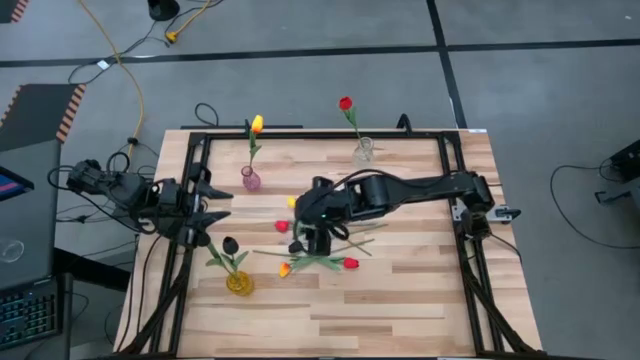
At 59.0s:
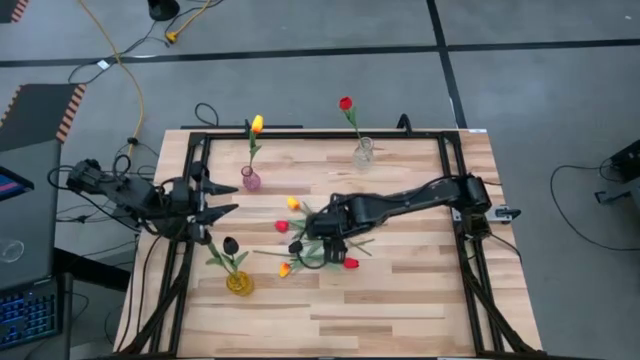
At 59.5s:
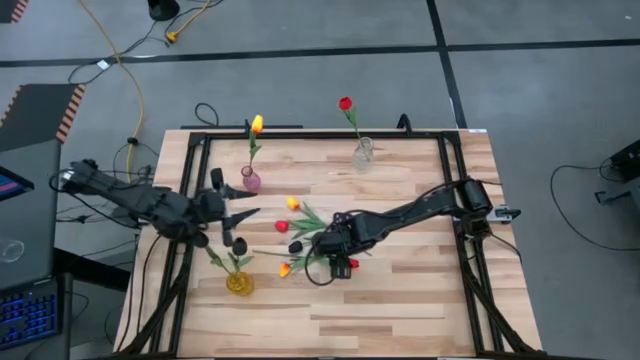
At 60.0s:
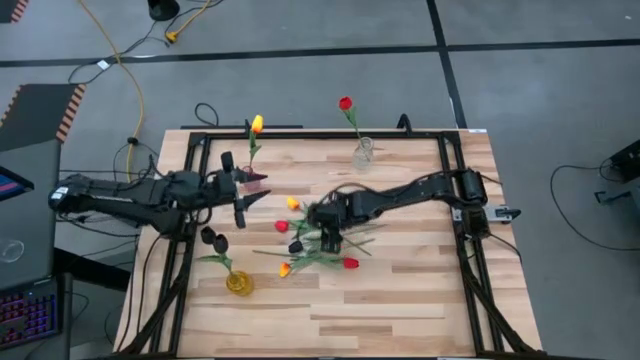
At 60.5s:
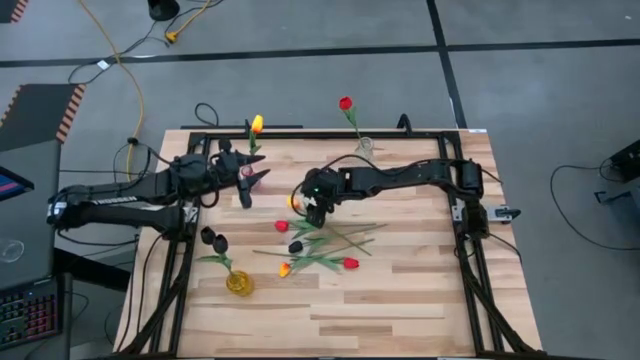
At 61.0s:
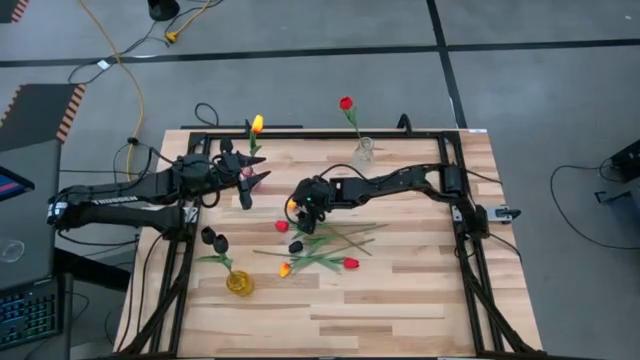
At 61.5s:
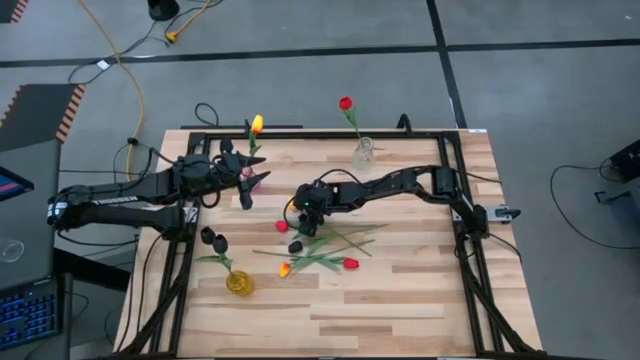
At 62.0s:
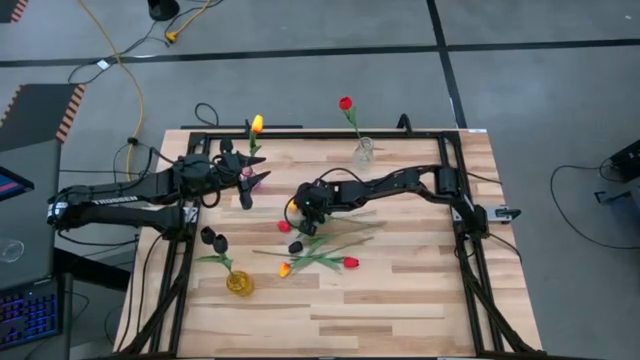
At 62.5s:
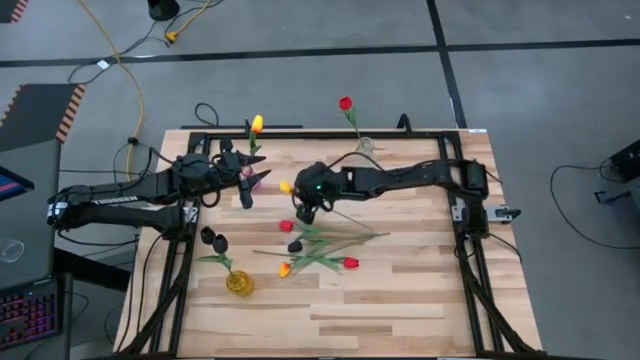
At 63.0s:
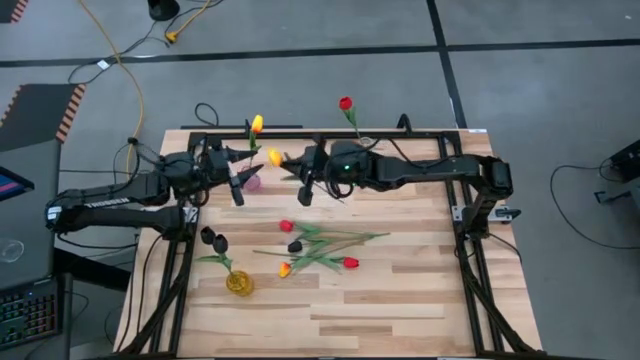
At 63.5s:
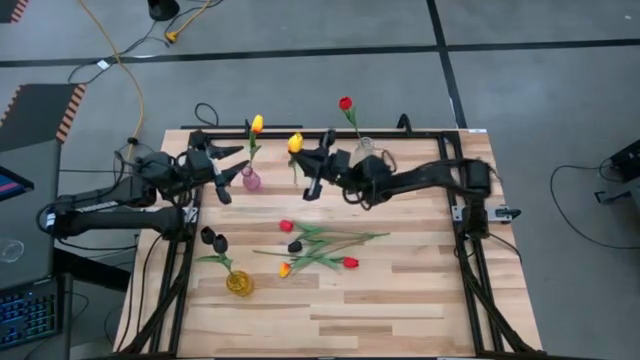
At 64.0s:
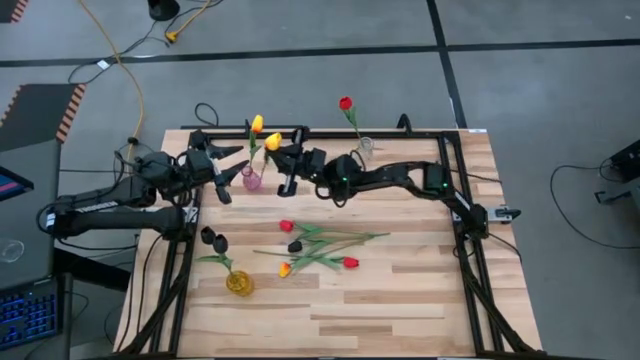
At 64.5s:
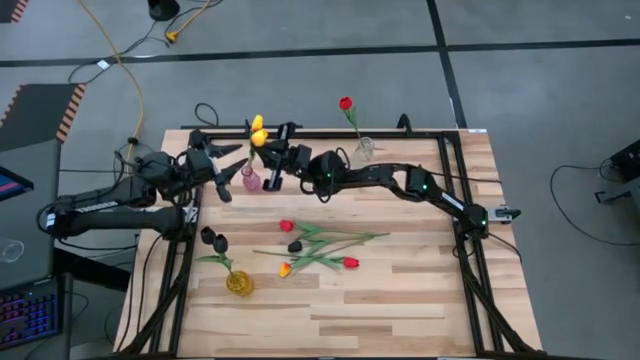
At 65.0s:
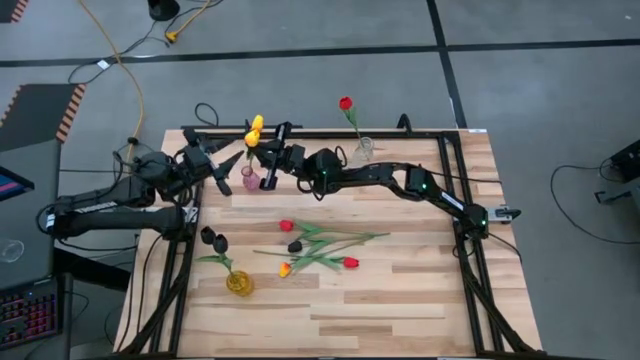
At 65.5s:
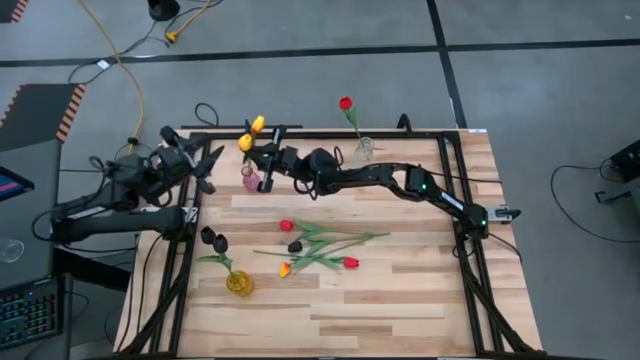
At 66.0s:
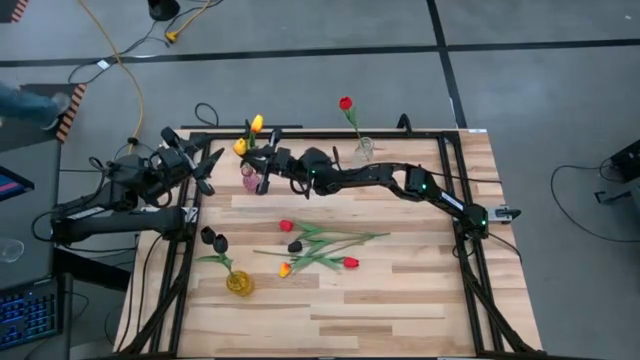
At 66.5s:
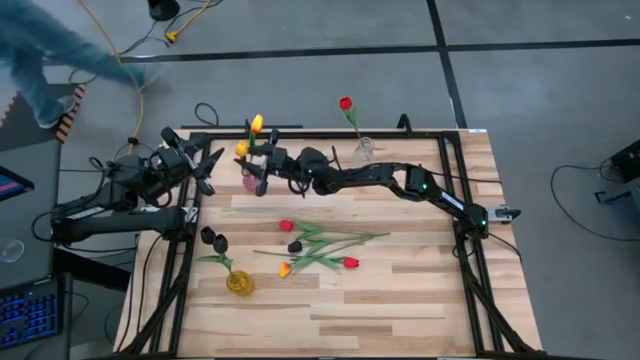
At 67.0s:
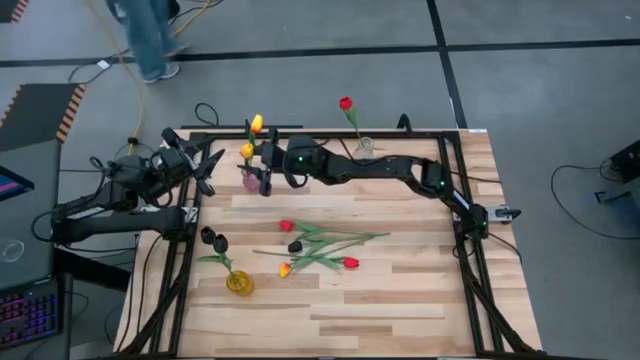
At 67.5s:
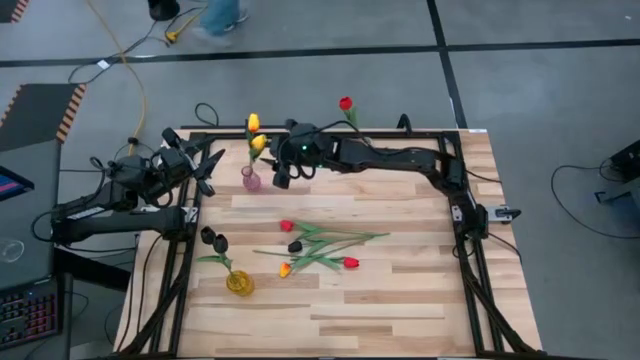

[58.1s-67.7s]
Task: Sort flowers into vase by color
Put the top yellow tulip into the purple vase

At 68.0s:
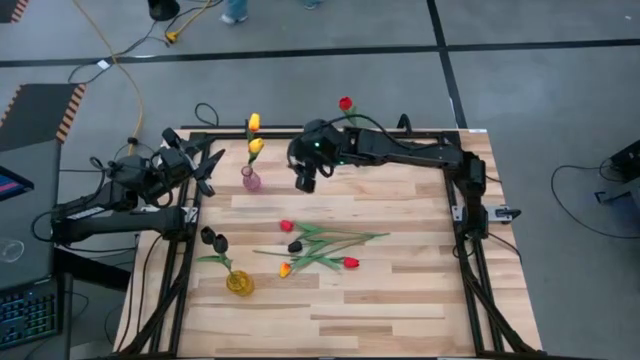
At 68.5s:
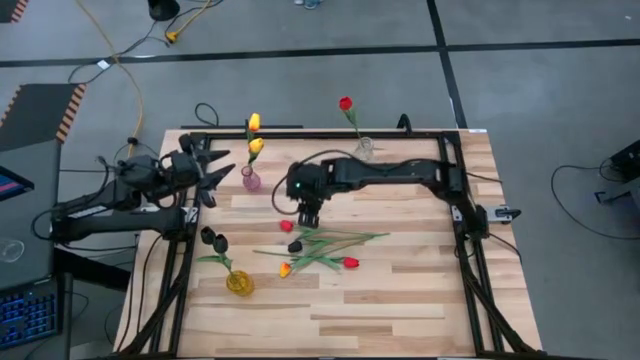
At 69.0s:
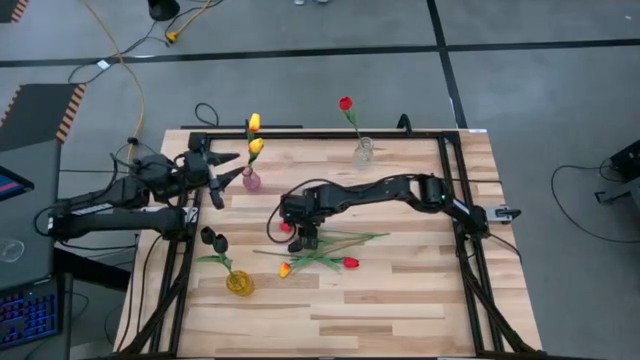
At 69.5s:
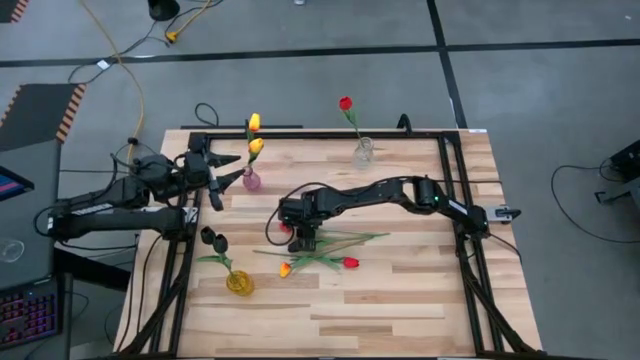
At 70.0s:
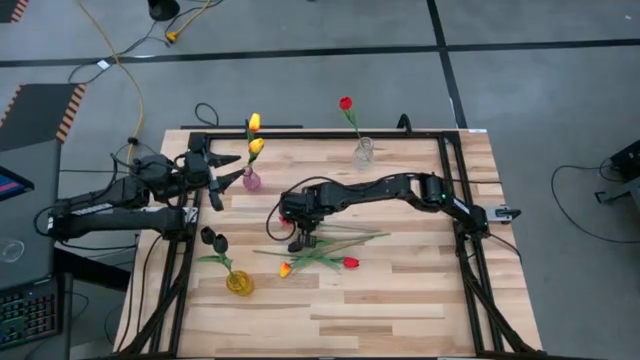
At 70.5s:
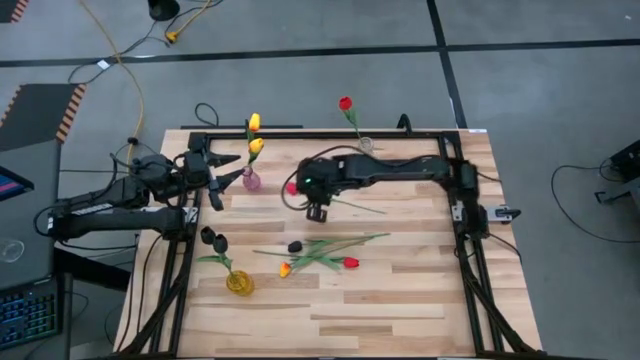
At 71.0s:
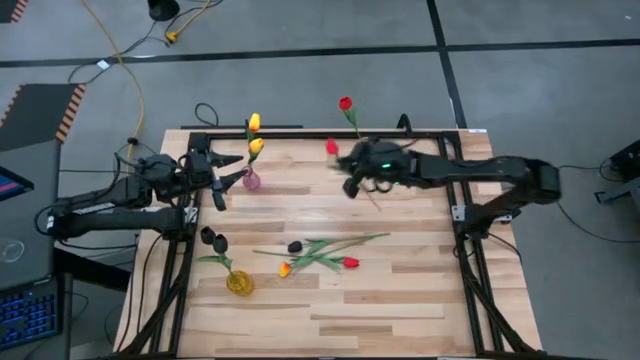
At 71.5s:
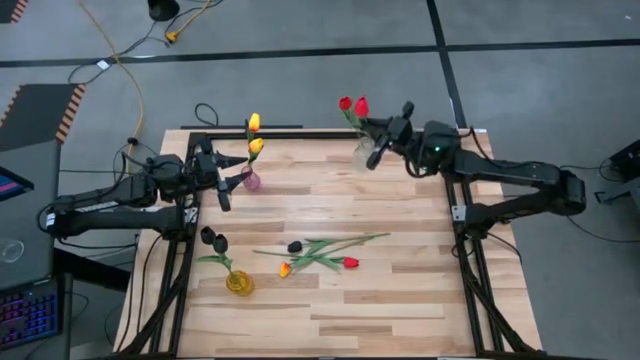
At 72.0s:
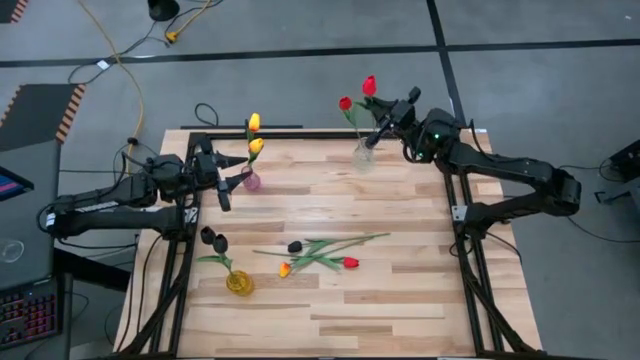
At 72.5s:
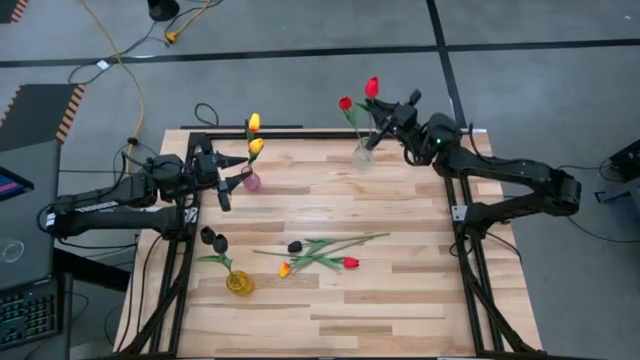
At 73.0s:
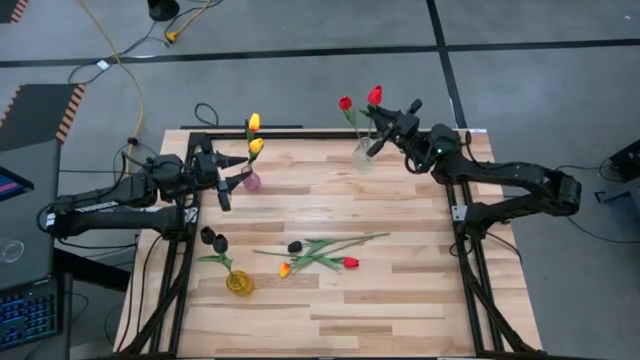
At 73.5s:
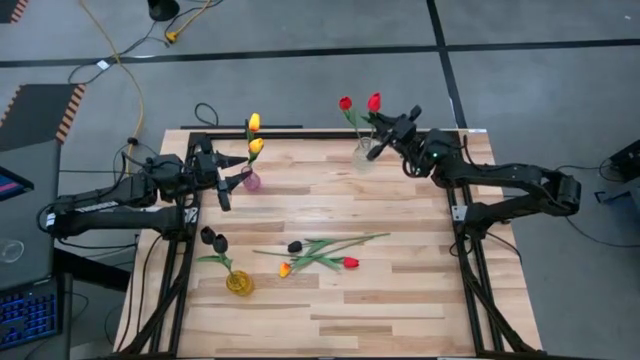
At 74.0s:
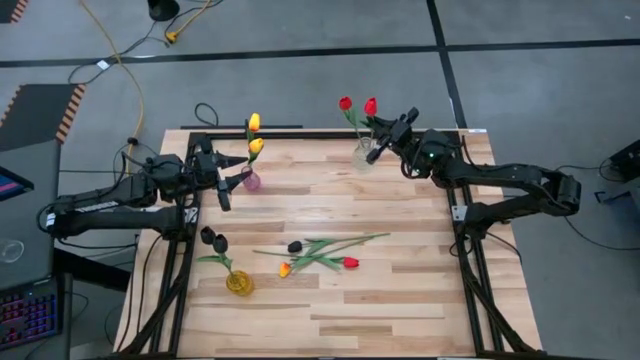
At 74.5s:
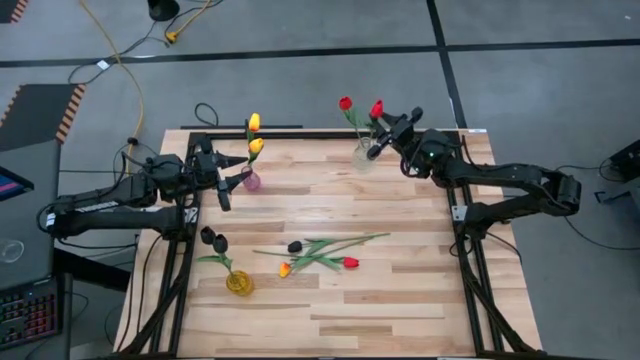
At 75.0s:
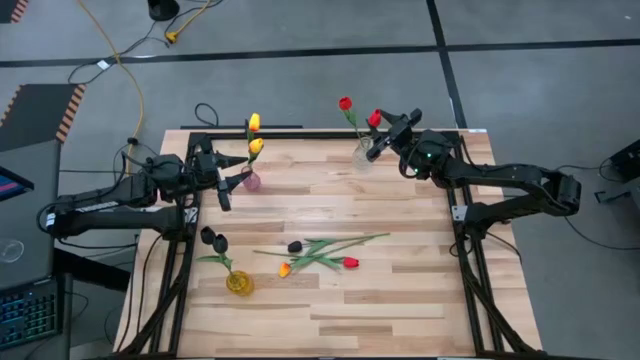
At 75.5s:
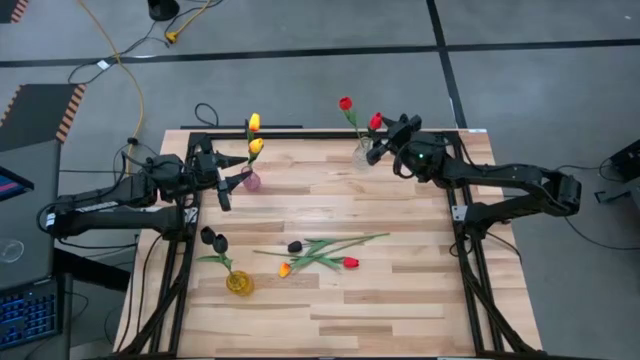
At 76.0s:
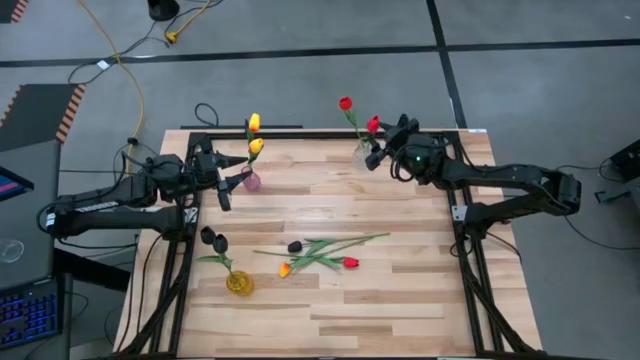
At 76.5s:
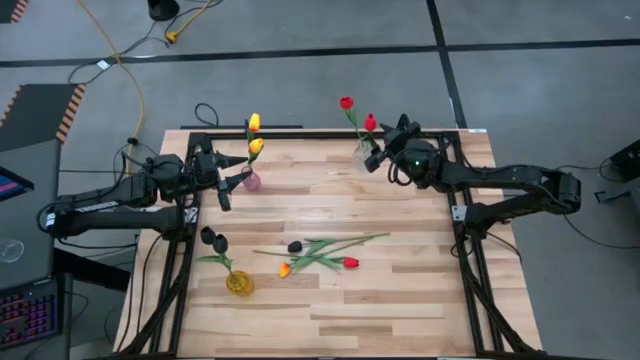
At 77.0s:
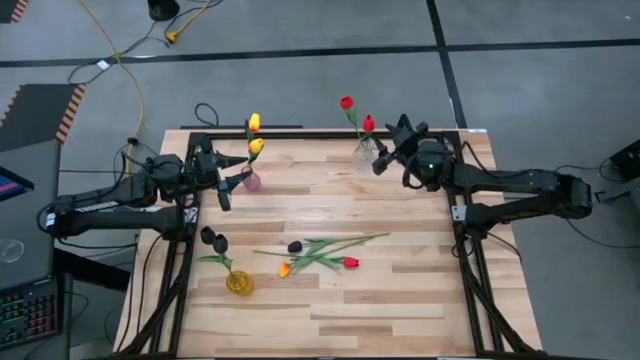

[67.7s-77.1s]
Put the top red tulip into the transparent vase

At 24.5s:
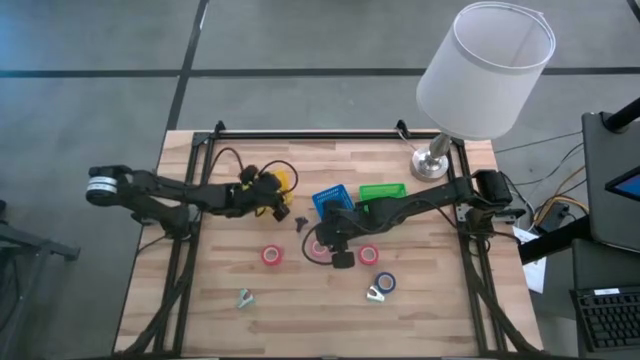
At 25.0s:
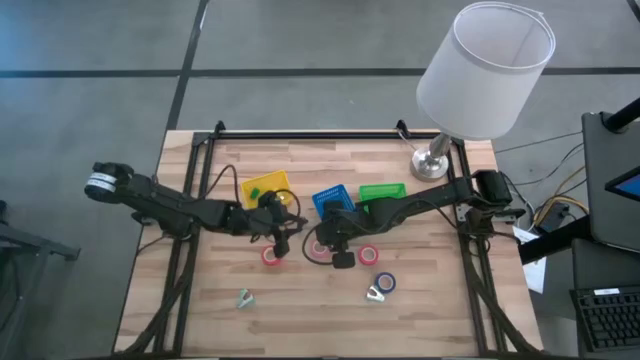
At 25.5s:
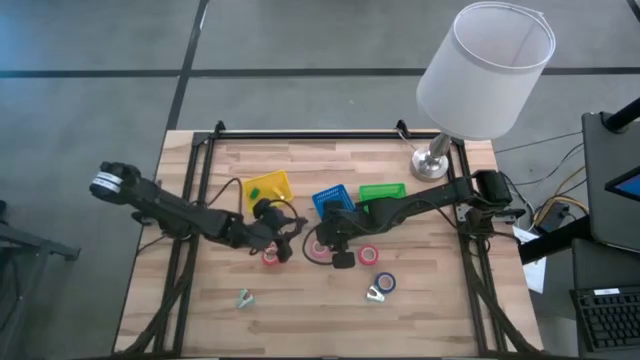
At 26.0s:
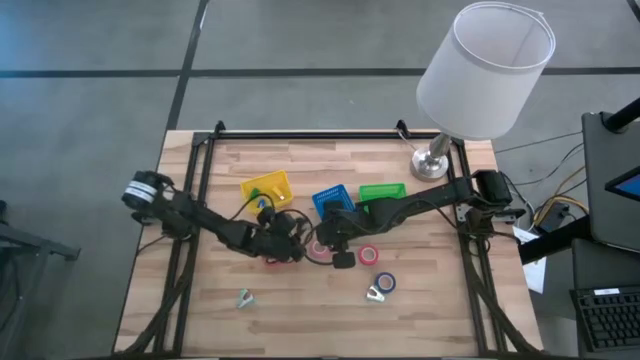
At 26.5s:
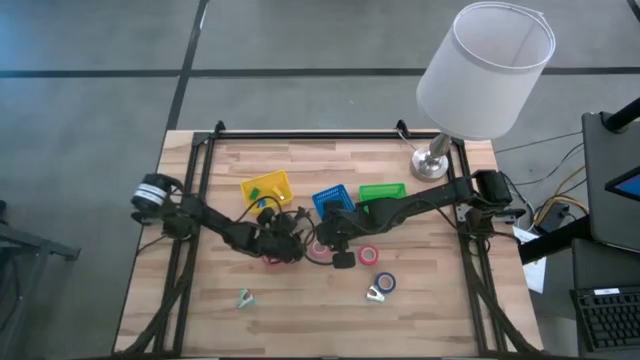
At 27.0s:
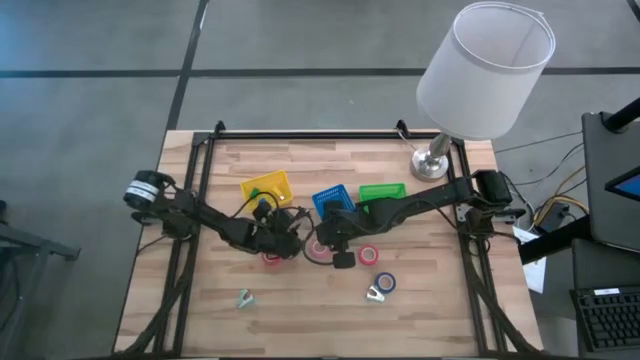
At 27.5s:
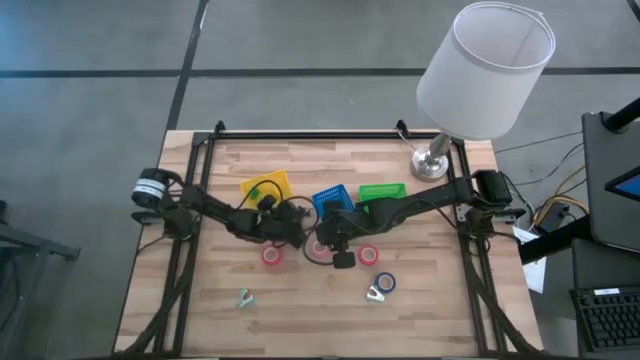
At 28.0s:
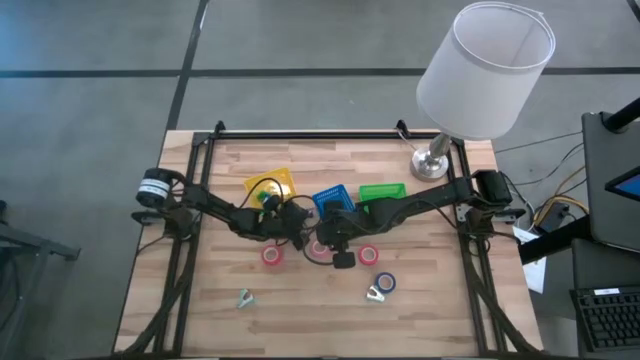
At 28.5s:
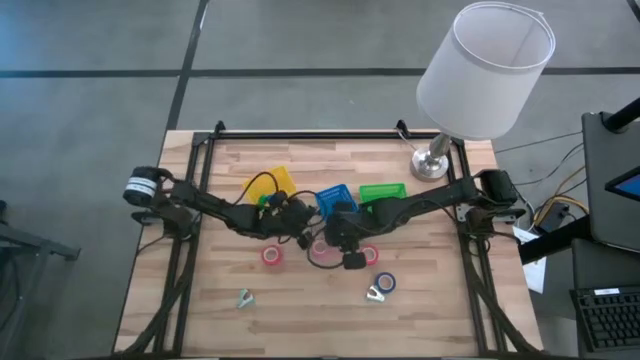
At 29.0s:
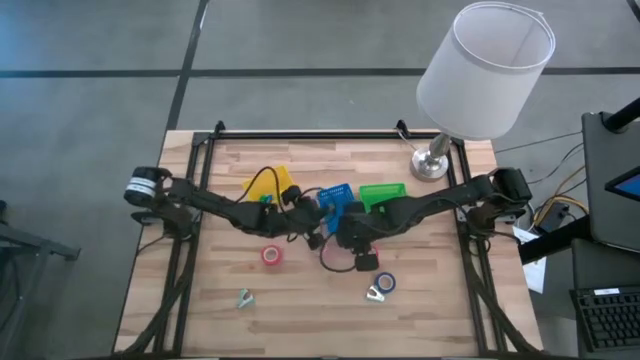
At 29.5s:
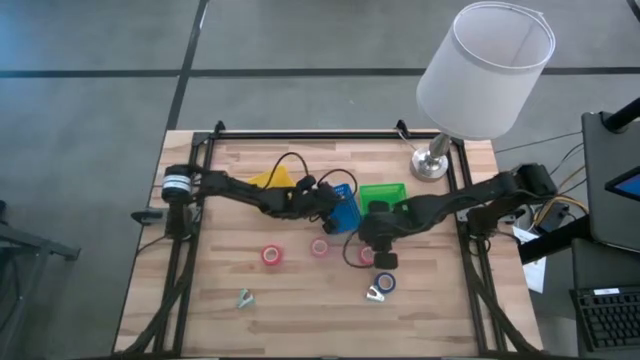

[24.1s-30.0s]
Task: Pick and place Stapler, Stapler remover, tape
Put the blue staple remover into the blue basket
